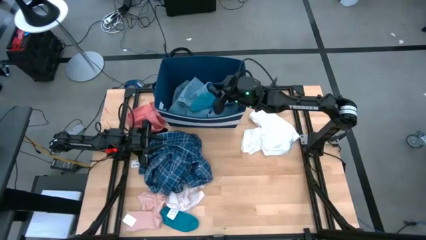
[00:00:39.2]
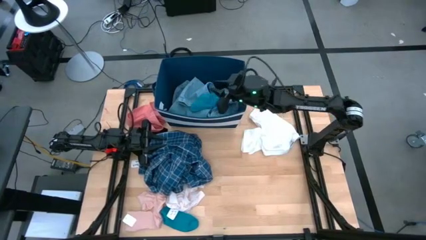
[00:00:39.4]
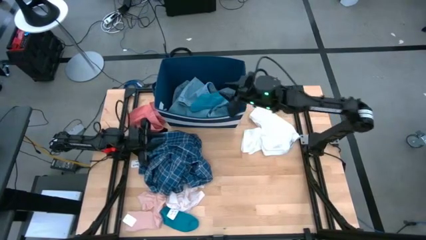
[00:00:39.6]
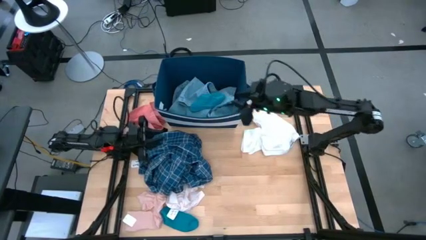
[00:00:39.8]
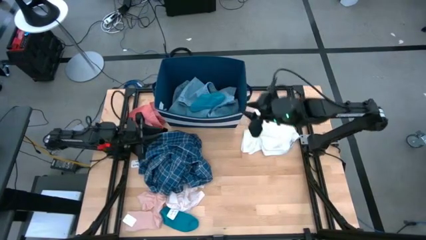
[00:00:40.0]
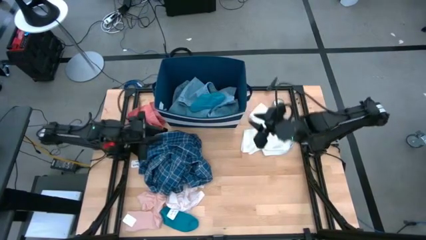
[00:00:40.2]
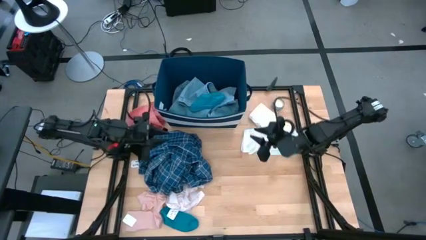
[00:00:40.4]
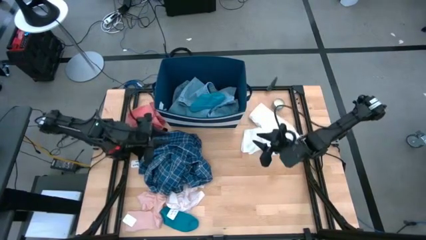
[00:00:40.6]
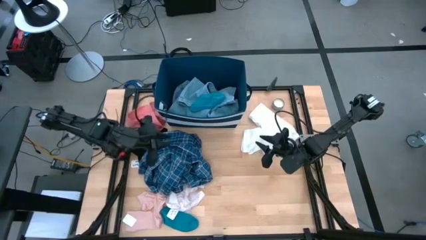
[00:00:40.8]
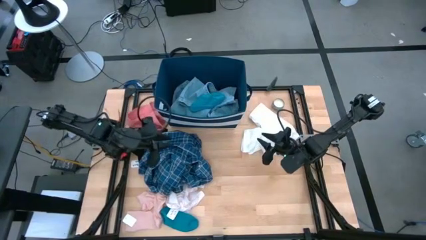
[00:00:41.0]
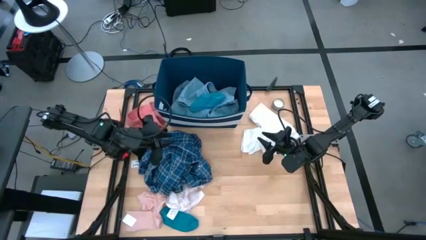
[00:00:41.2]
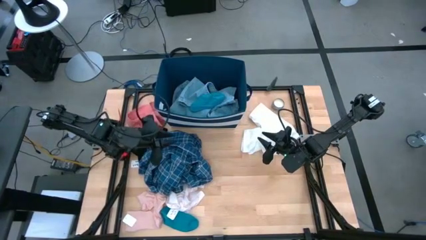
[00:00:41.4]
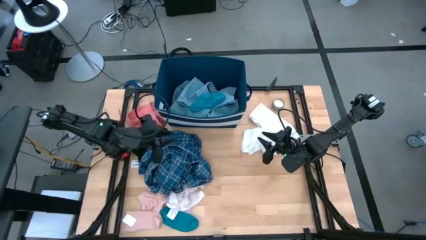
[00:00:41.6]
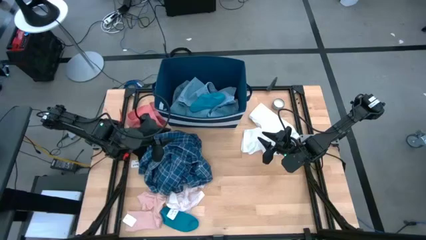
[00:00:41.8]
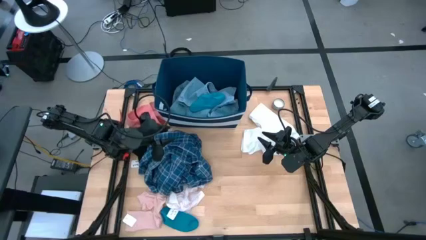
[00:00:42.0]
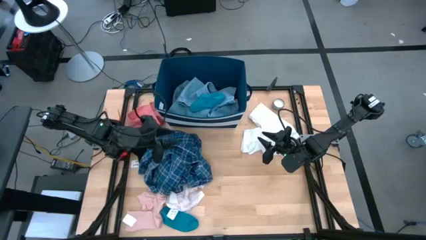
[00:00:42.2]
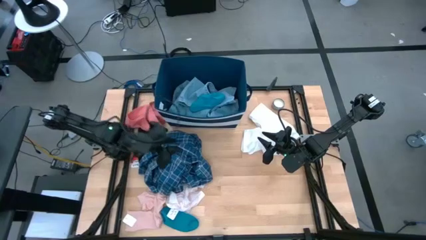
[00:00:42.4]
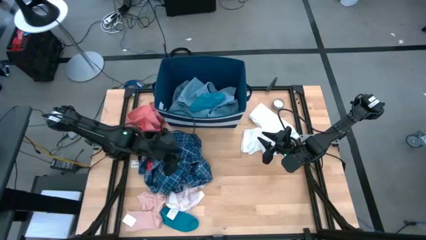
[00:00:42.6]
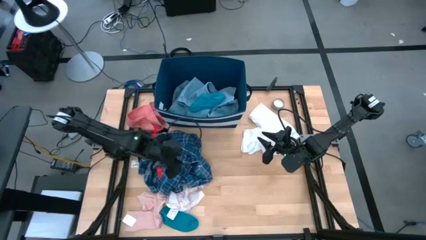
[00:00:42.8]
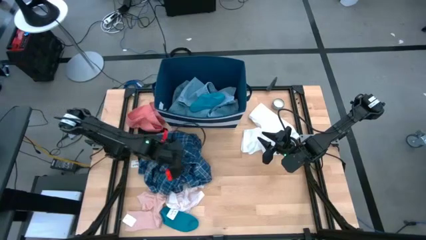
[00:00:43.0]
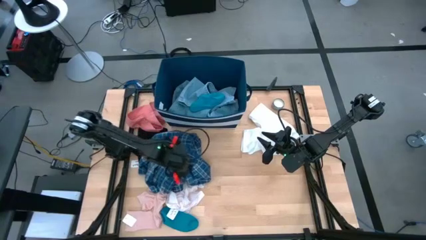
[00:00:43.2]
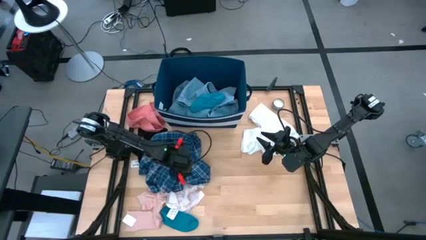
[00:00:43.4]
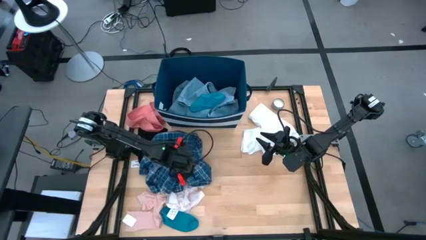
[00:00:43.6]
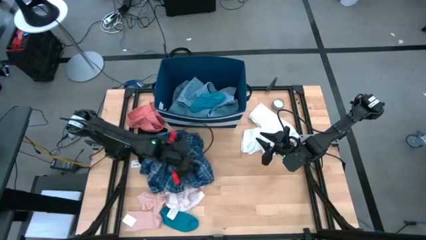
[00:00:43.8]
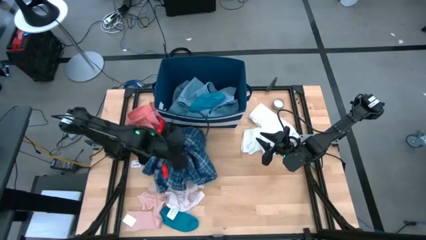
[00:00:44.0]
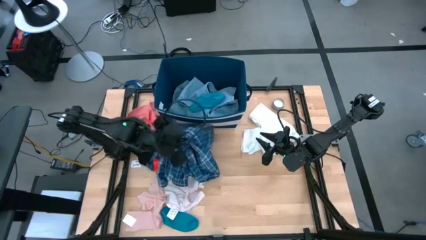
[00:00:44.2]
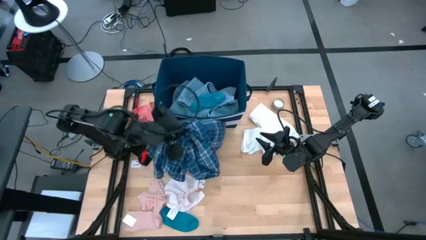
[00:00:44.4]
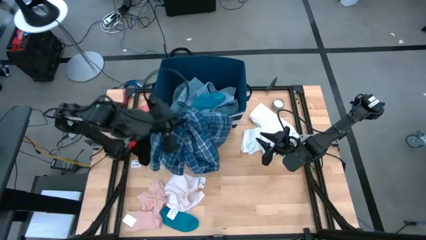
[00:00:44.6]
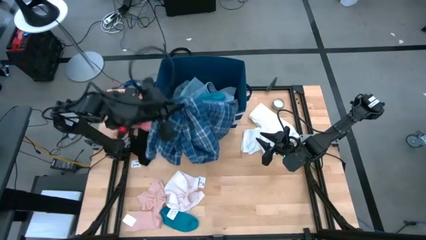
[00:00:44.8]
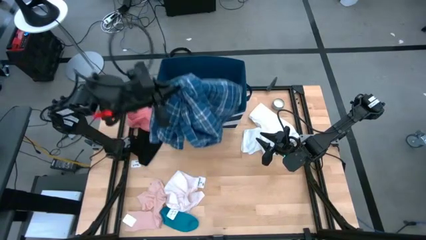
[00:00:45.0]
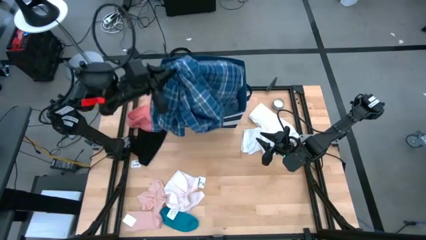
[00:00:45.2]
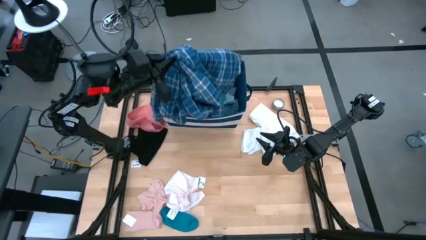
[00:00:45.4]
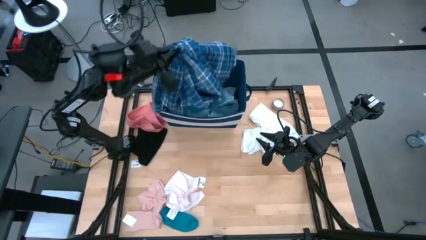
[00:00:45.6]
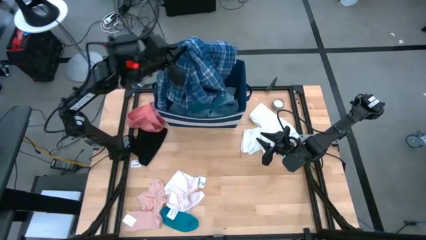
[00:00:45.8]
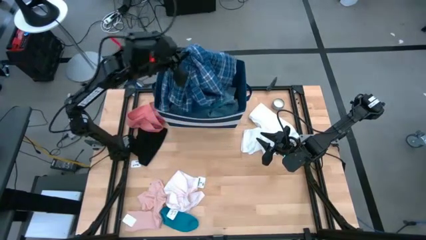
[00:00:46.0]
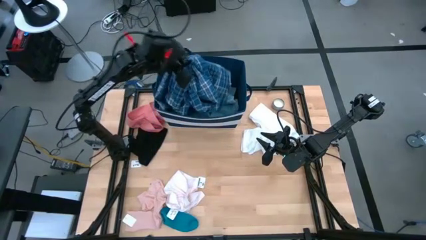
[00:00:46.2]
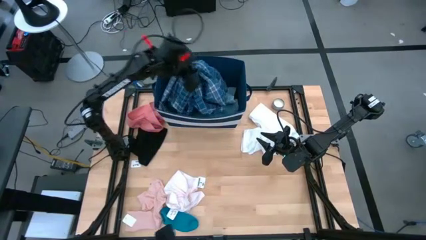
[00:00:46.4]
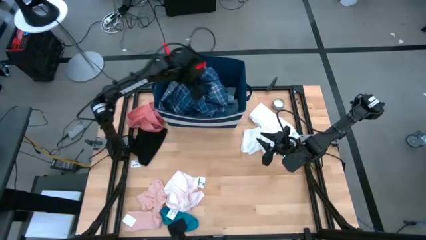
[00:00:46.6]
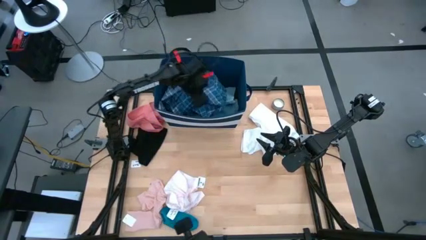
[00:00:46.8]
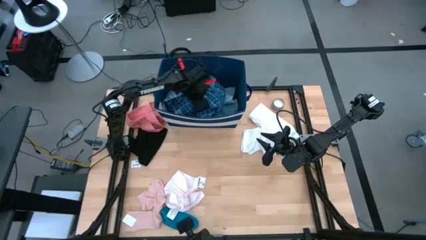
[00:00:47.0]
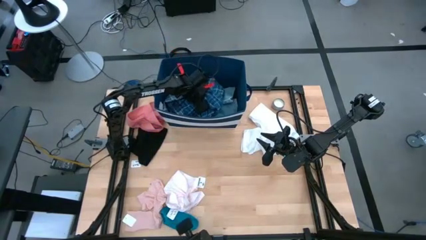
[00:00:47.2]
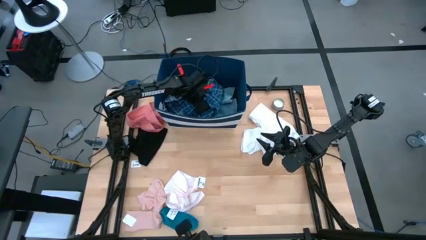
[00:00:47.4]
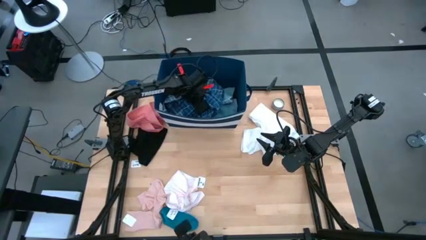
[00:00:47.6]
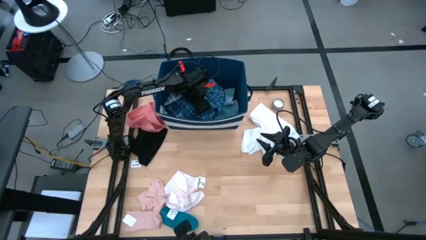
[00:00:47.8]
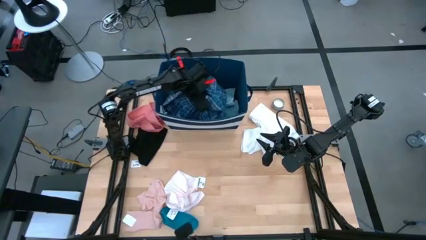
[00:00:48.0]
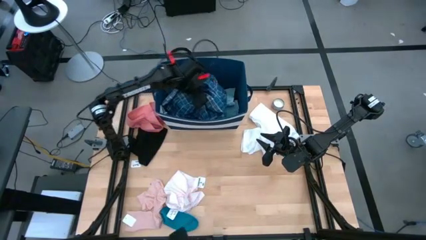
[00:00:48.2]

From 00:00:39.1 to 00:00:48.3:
Task: Sort clothes
Put the blue pajama into the blue laundry bin

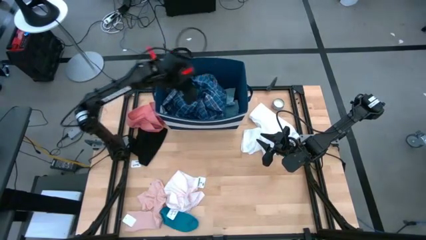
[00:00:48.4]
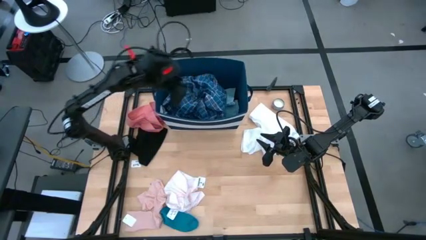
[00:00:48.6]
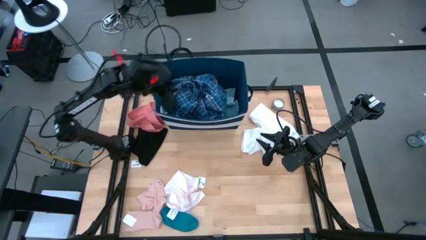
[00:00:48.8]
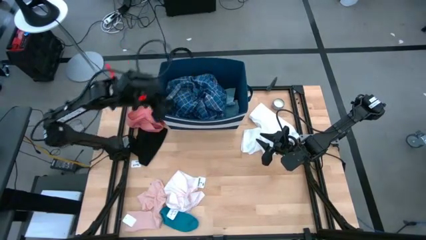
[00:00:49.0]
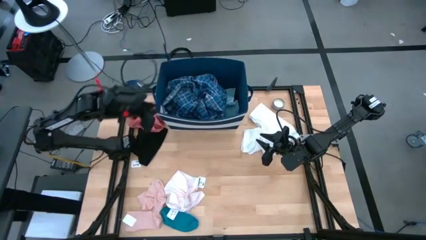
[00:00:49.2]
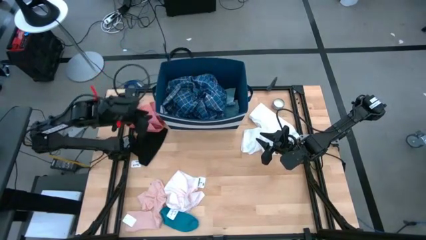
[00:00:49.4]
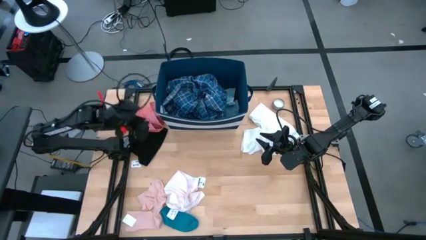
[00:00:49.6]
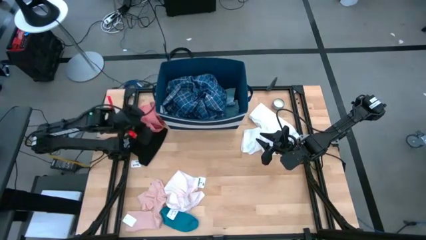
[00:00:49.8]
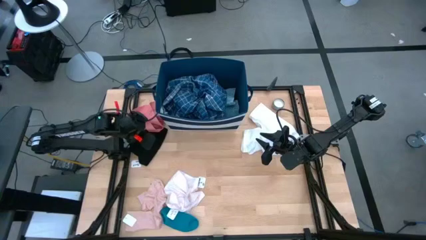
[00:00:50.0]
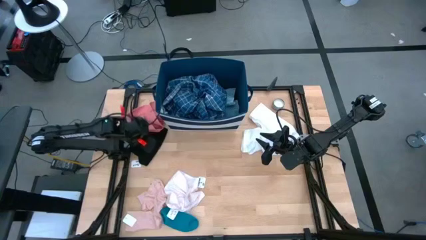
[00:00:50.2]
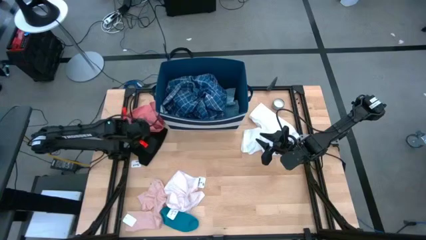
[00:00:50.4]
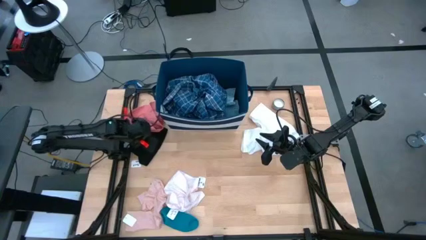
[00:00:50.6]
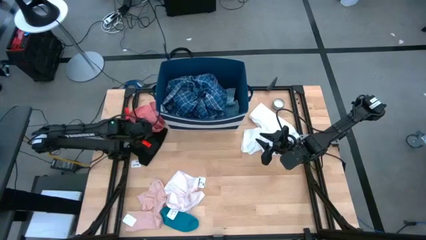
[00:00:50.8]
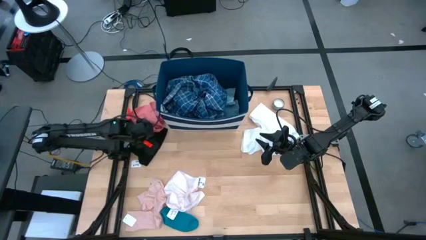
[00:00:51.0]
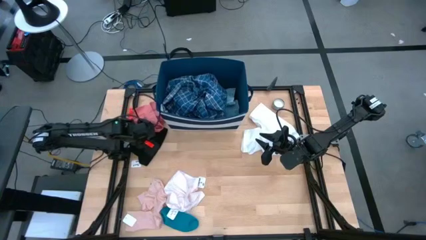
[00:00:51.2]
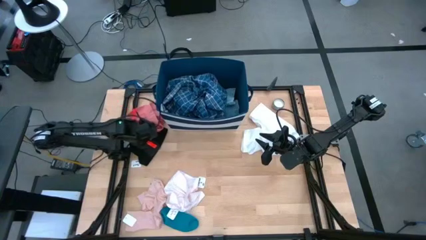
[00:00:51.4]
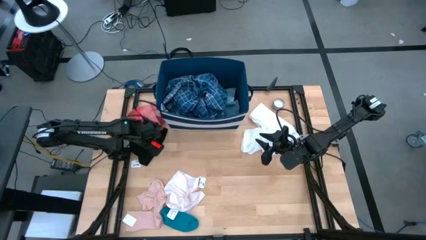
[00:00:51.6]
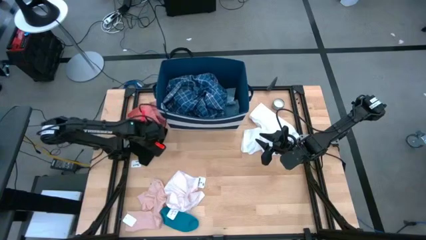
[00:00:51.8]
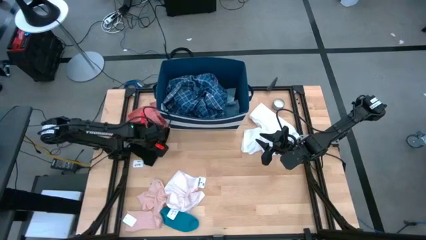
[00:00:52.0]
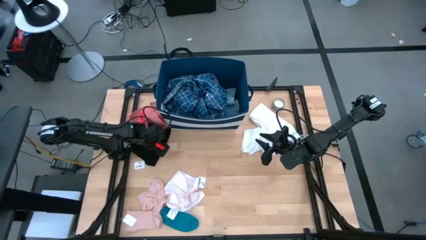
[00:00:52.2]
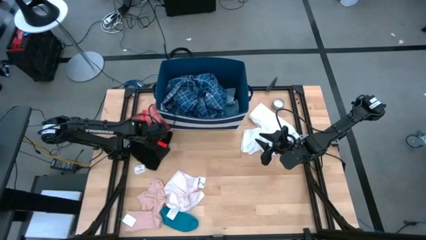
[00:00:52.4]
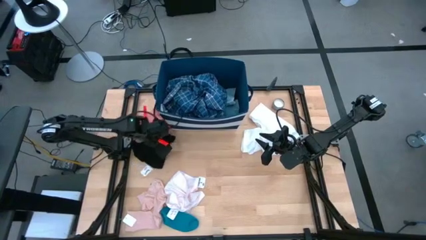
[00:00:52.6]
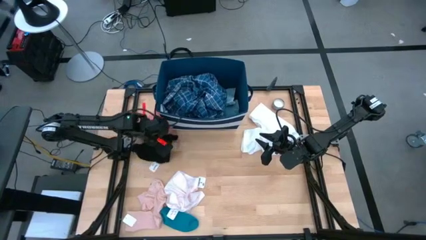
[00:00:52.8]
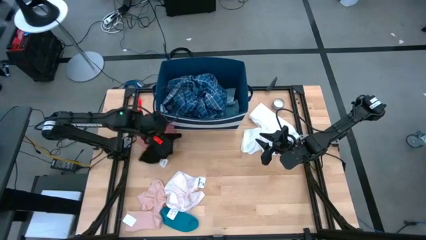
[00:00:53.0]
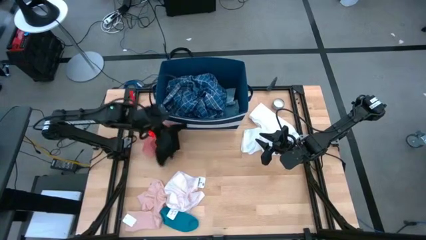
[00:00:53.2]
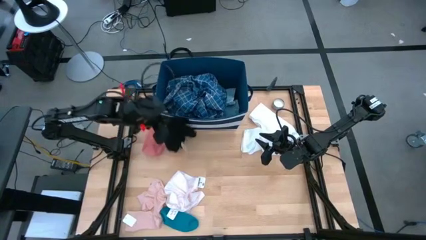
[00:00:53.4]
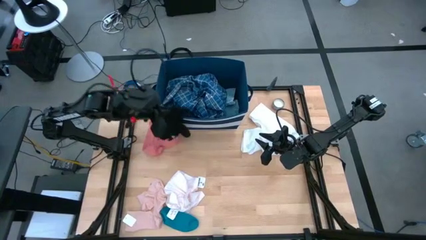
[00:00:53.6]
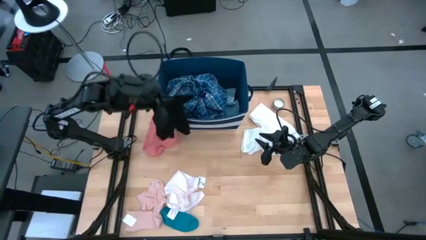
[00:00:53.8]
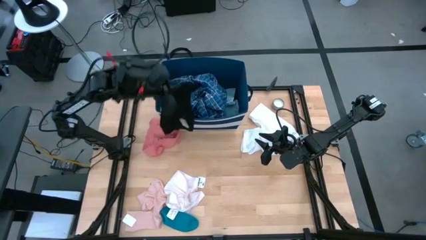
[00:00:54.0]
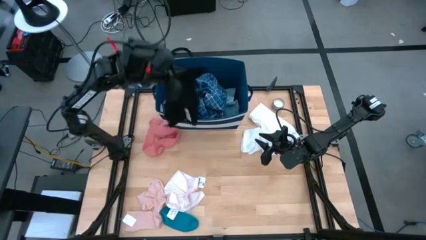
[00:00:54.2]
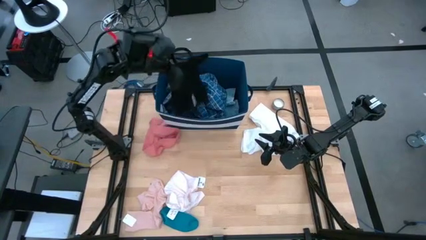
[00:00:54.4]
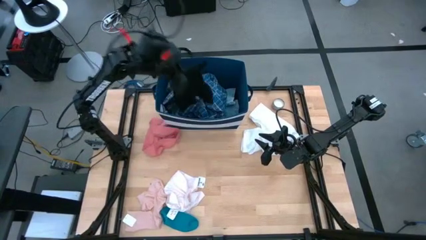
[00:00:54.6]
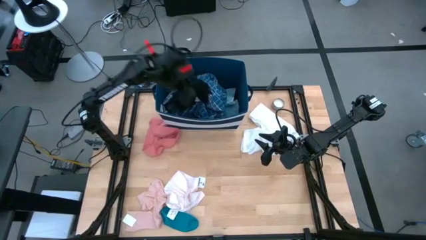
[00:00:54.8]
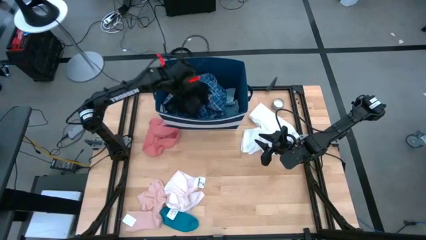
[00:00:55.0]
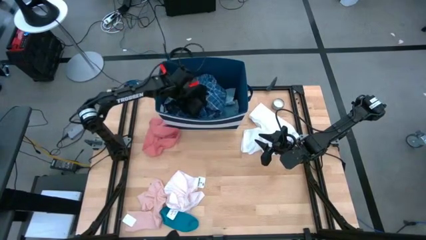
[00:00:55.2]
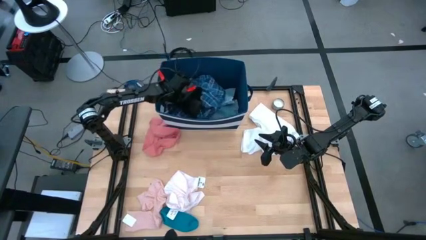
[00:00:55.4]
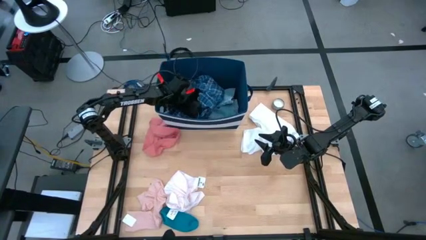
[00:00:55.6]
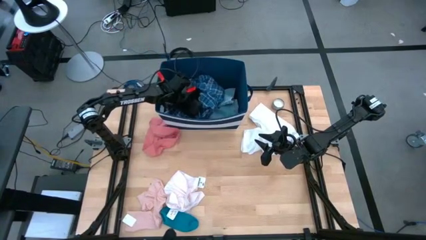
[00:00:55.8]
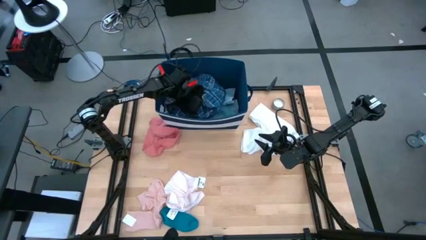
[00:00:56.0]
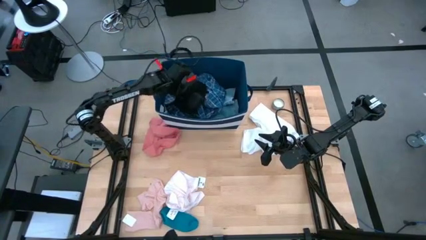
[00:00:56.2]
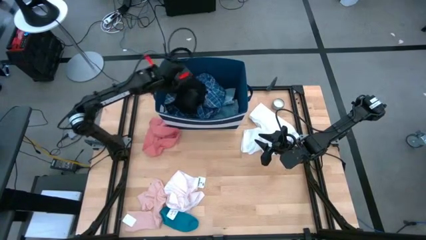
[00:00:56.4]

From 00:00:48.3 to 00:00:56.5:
Put the black underwear into the blue laundry bin
